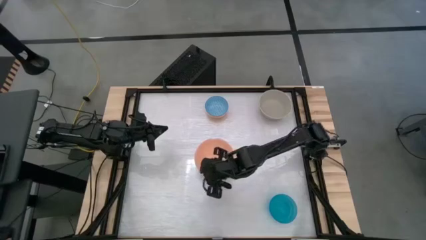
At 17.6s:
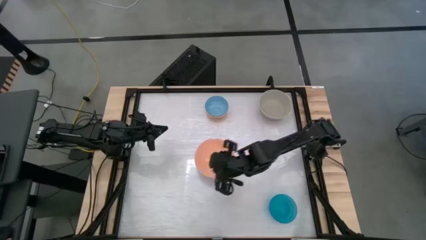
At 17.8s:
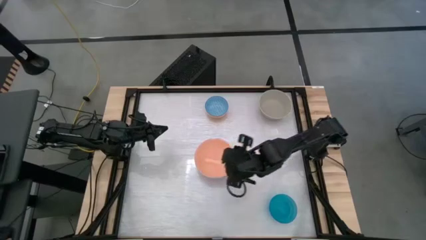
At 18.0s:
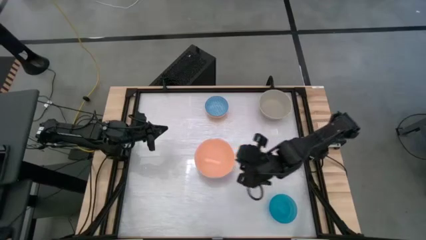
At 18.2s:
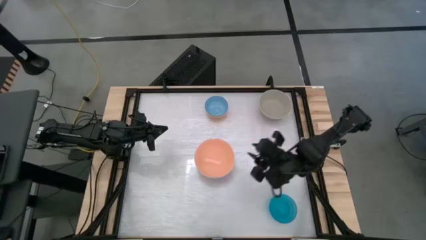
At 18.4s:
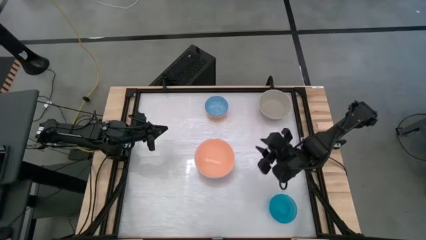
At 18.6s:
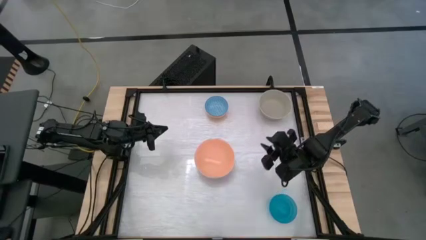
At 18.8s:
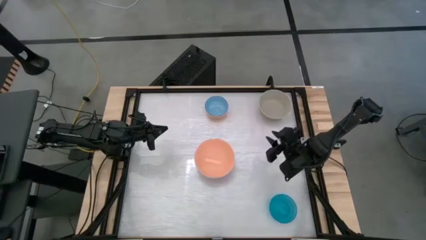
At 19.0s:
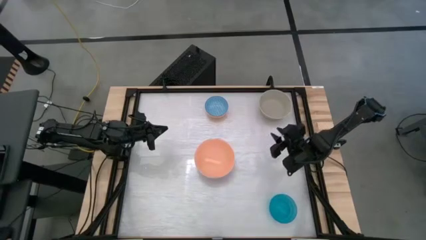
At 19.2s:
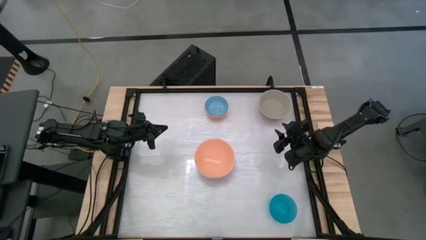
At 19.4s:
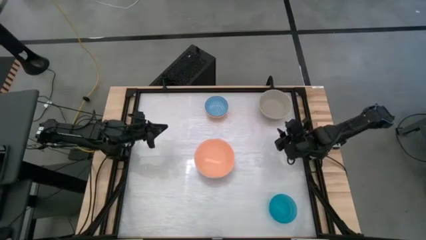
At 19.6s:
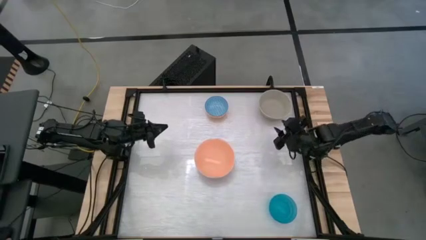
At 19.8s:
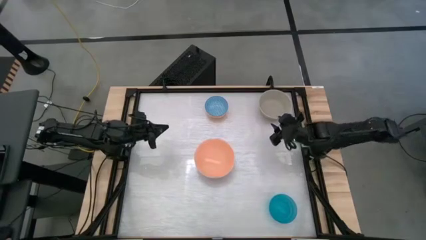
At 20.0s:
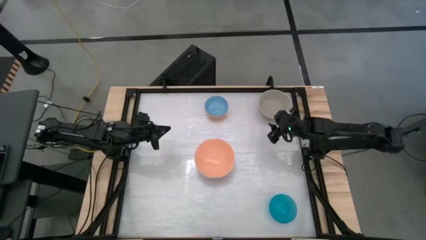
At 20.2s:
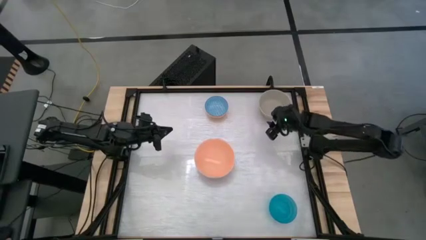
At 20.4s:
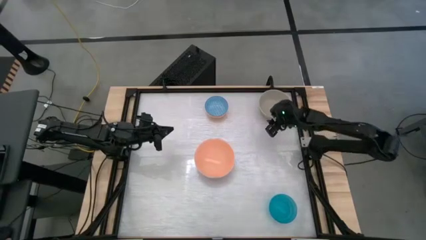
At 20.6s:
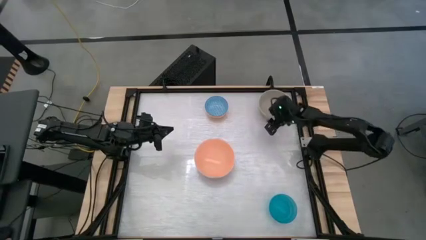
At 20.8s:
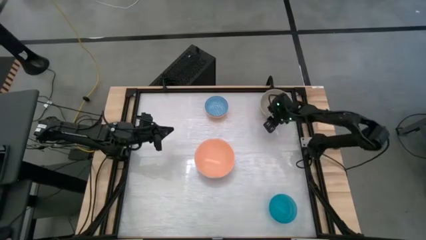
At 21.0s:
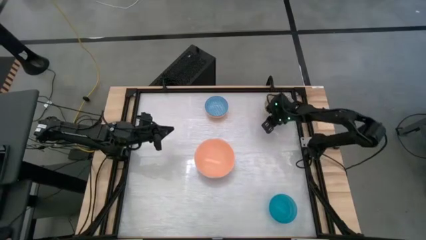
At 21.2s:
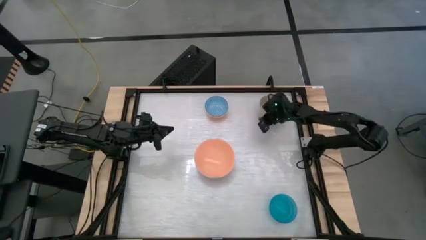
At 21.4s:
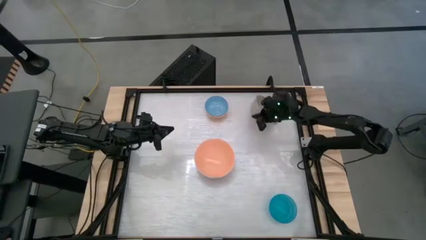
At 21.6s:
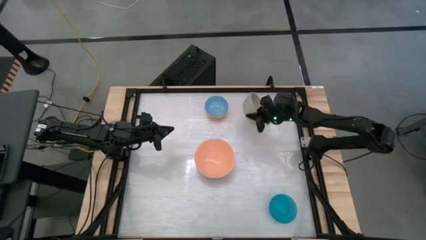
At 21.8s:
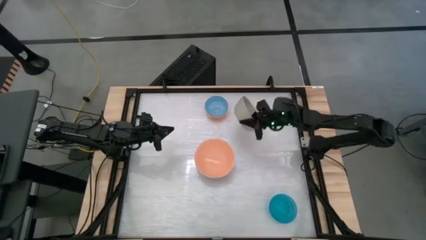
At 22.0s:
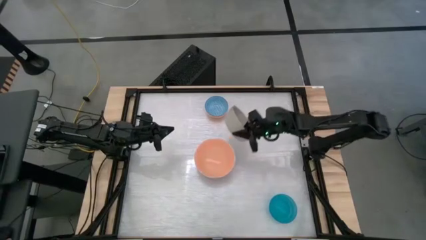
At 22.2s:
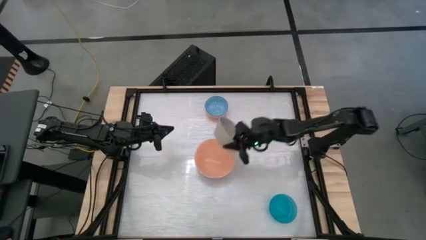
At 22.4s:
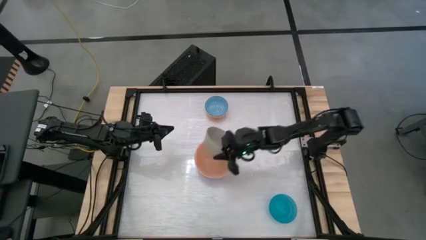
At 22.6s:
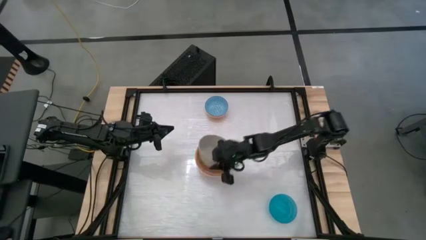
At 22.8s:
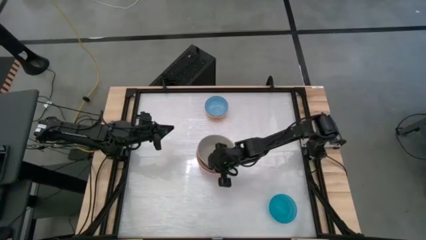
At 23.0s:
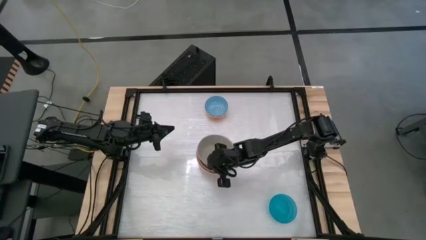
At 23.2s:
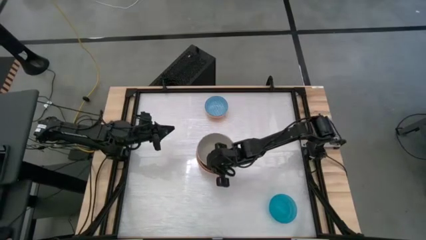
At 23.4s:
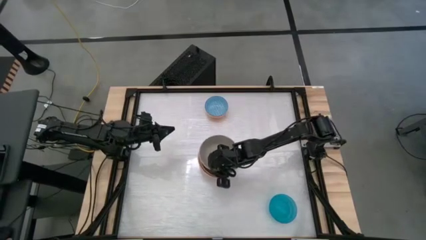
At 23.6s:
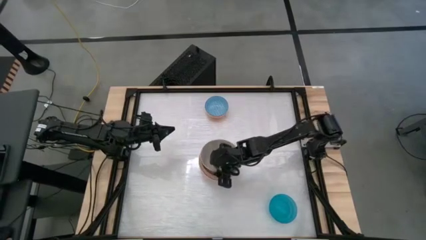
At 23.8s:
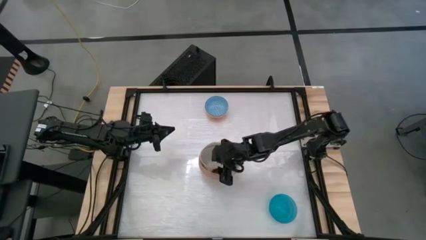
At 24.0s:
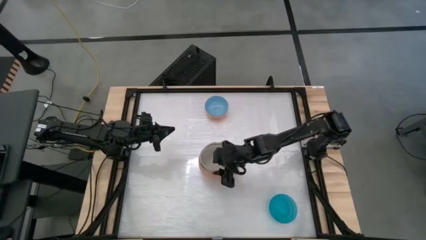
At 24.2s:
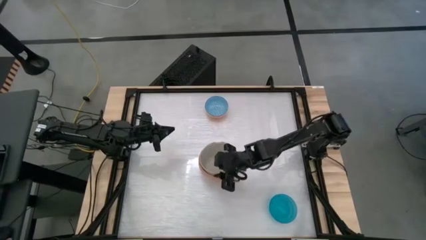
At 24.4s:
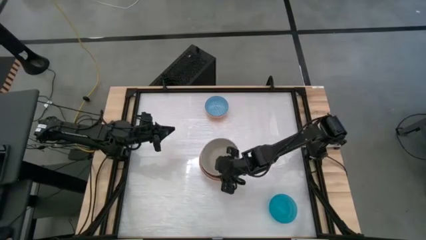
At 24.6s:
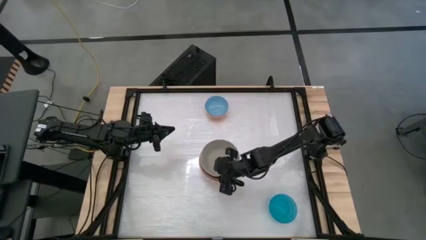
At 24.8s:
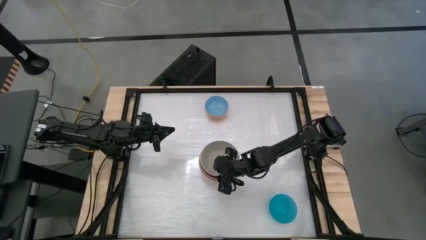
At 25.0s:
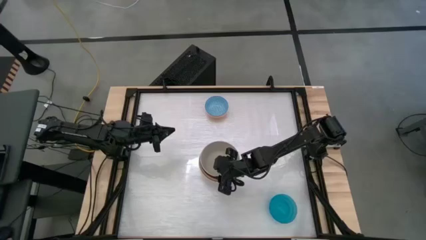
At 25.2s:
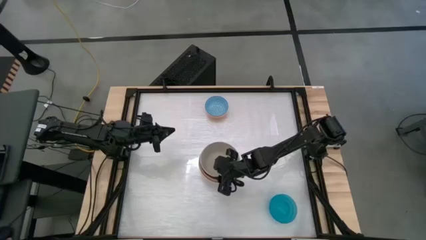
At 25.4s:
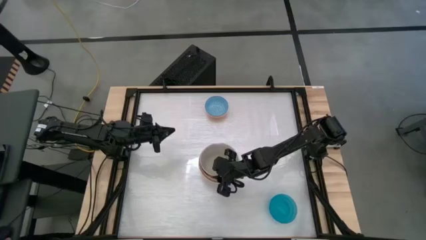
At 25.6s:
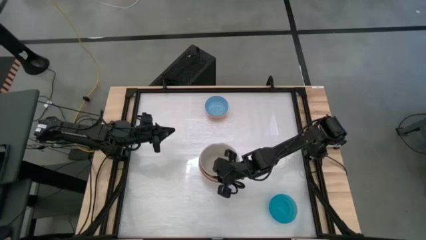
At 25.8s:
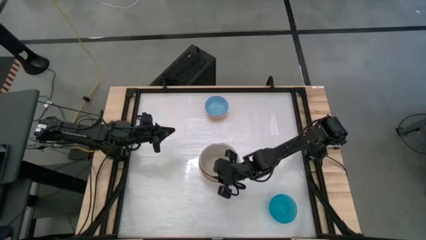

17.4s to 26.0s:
Stack the gray bowl on top of the orange bowl

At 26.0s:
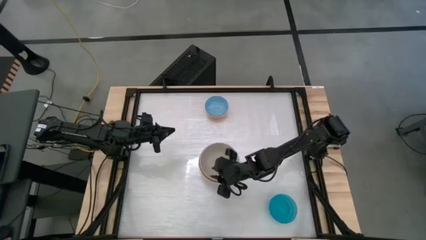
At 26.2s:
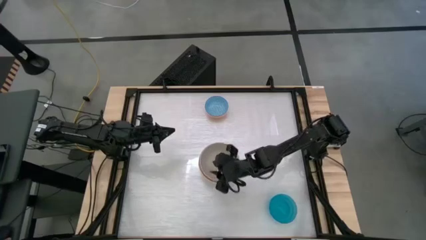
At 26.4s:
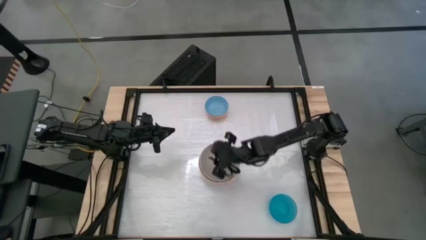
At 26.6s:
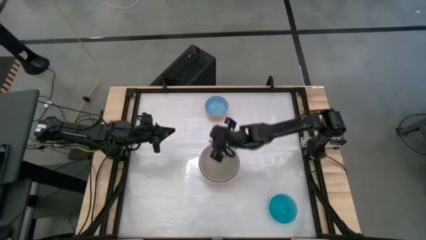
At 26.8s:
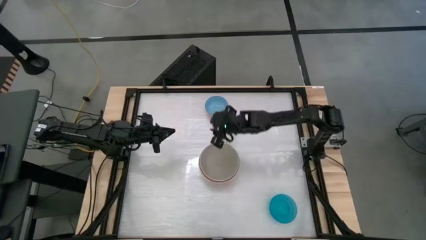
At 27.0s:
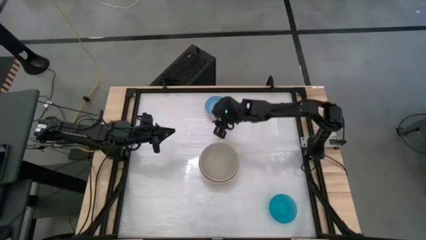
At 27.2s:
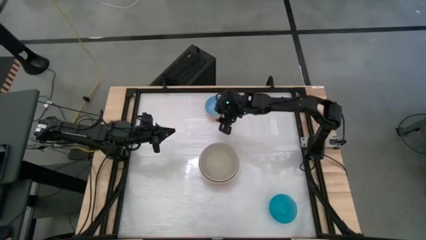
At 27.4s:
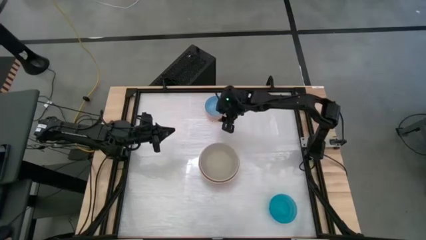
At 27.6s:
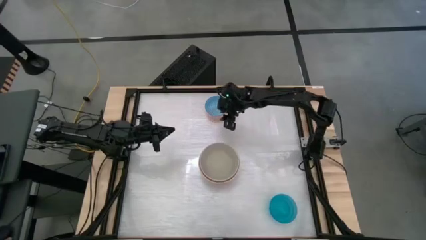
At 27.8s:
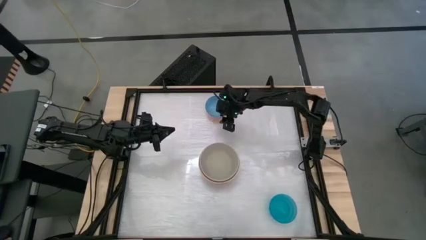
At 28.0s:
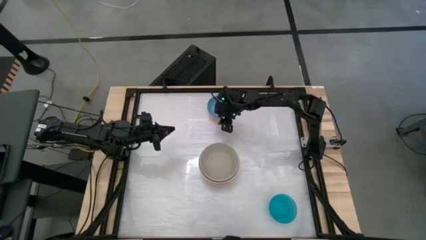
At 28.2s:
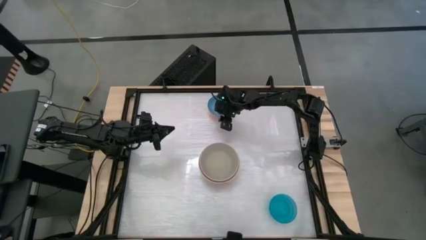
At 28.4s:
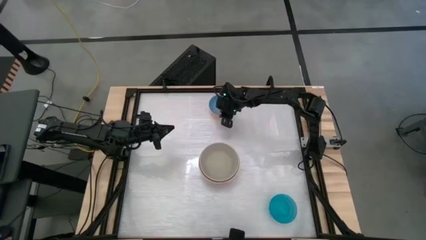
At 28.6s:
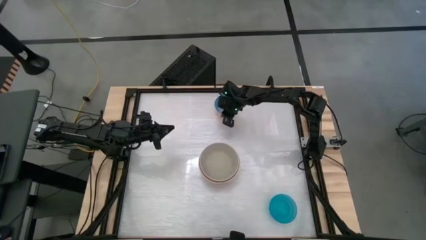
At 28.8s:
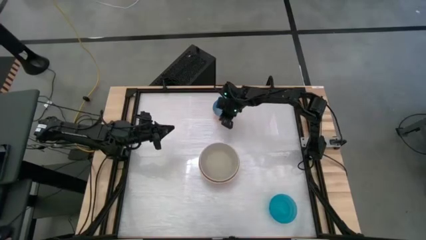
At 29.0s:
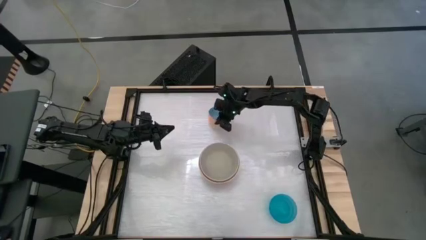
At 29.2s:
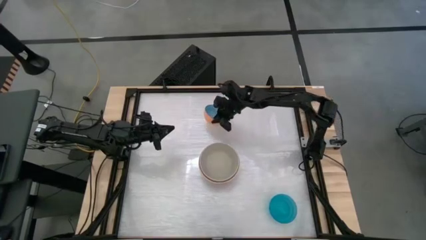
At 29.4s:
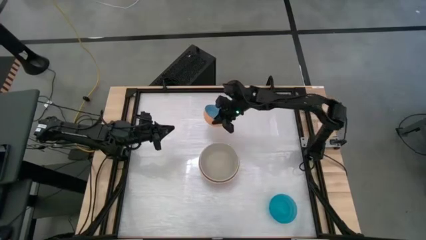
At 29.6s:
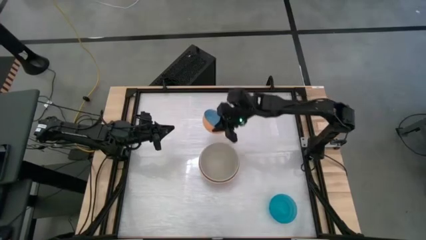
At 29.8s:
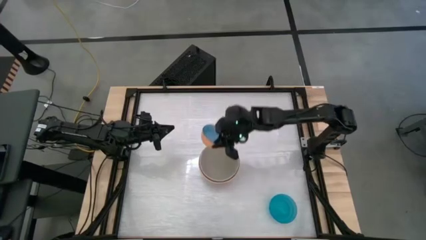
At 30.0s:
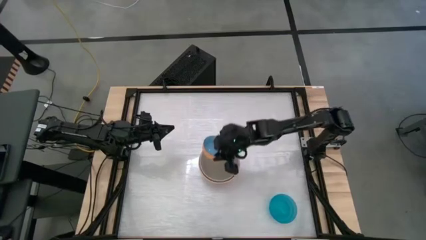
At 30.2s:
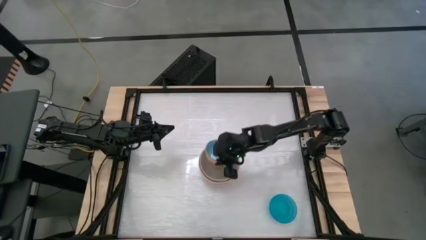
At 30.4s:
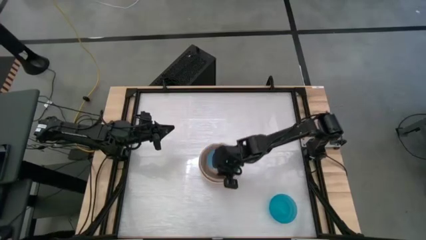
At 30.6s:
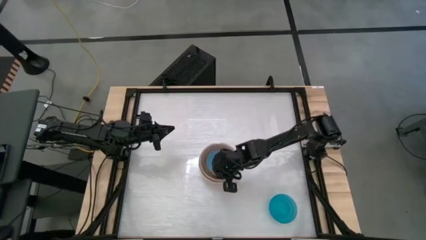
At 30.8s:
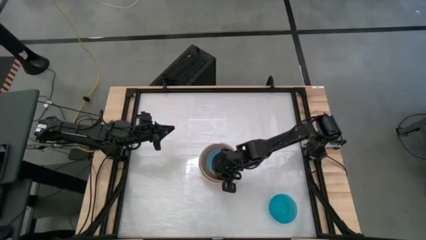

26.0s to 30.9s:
Stack the blue patterned bowl on top of the gray bowl

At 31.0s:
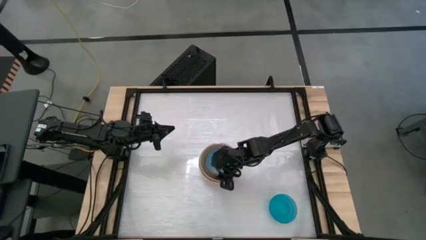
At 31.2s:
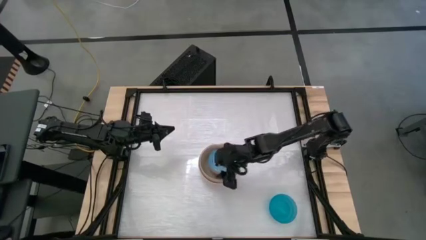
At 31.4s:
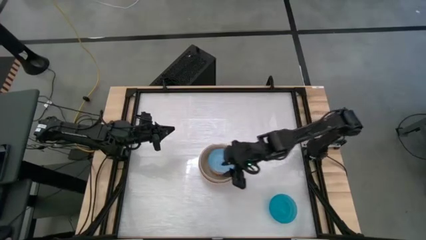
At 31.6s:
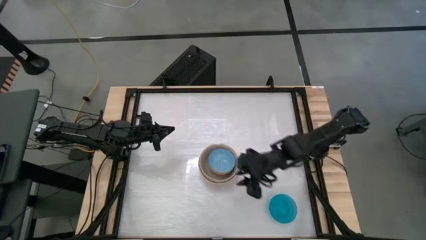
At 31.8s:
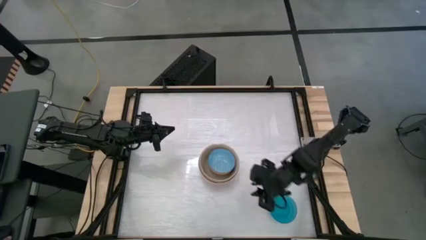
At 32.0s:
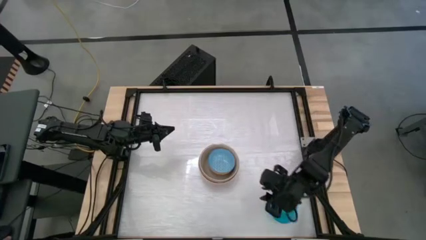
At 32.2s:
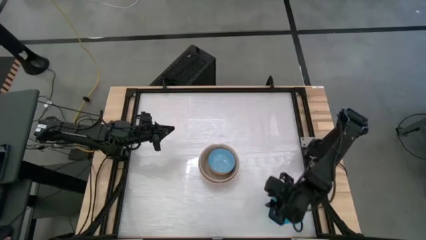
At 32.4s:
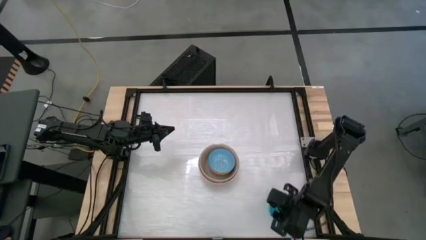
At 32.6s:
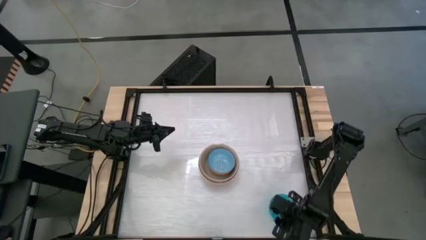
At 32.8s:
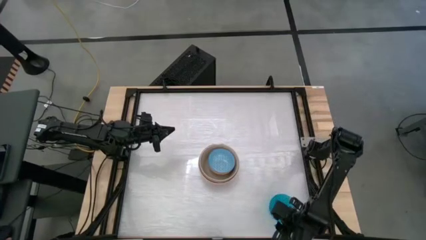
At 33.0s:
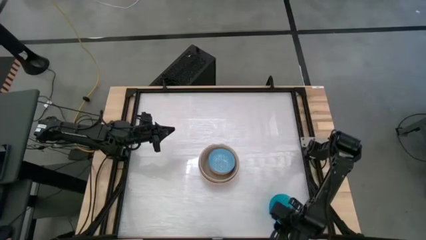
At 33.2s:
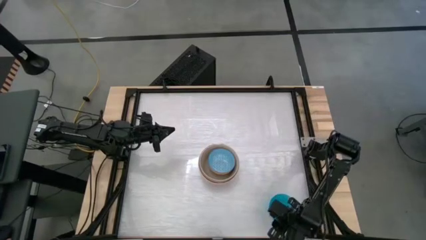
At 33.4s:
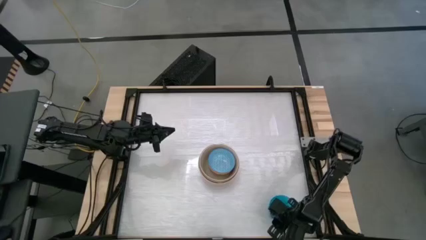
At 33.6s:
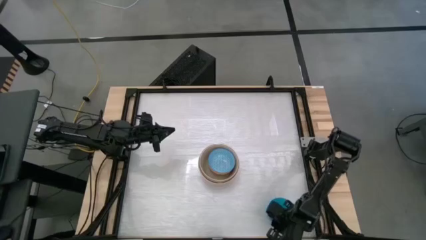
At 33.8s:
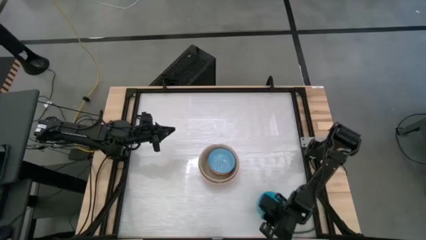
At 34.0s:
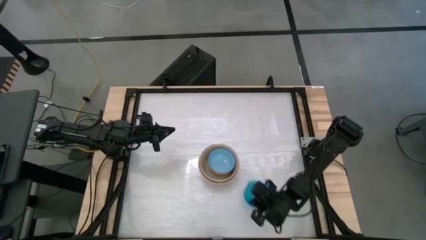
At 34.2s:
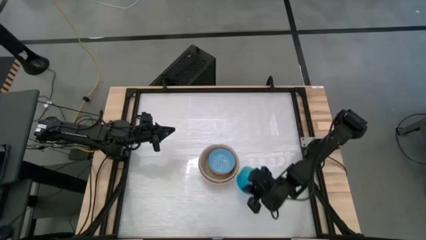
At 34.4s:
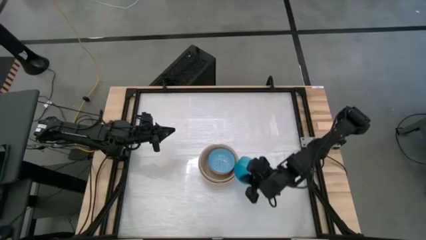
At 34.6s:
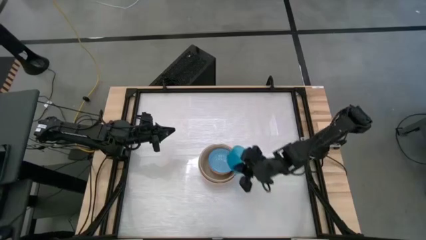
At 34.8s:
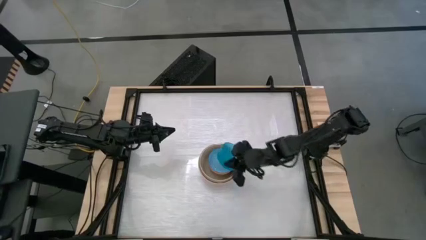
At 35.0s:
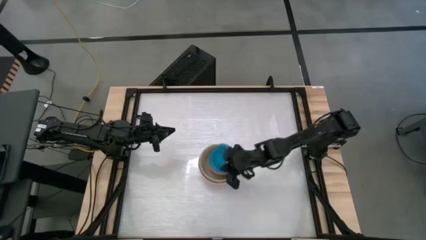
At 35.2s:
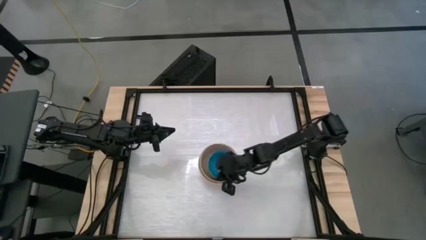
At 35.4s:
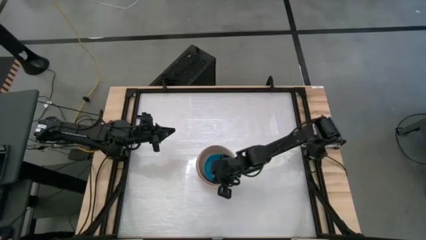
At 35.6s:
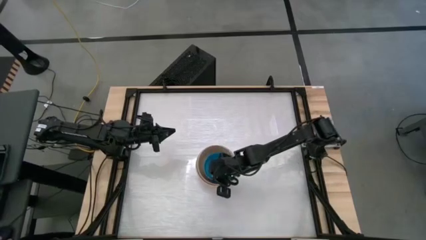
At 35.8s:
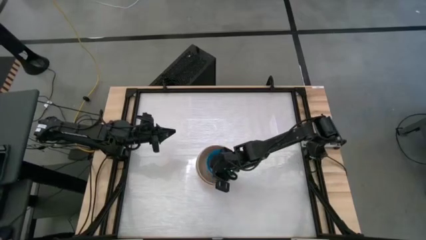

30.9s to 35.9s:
Stack the blue bowl on top of the blue patterned bowl
